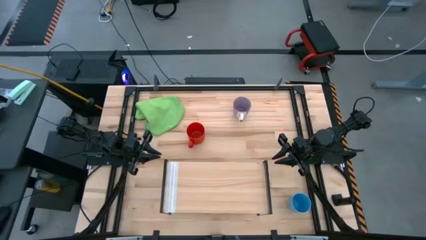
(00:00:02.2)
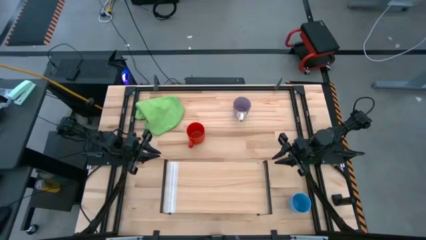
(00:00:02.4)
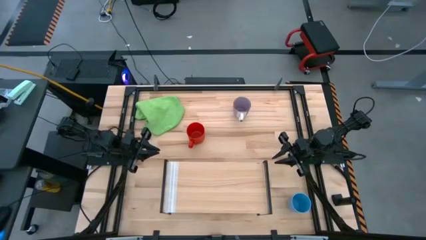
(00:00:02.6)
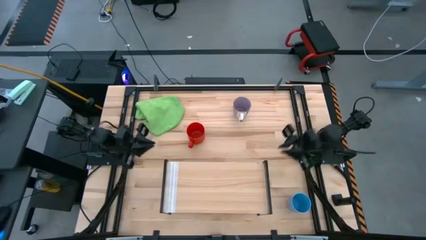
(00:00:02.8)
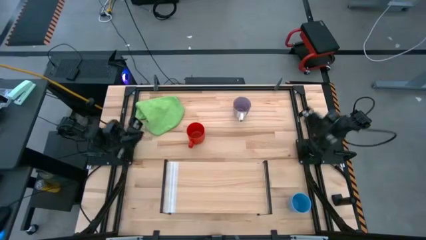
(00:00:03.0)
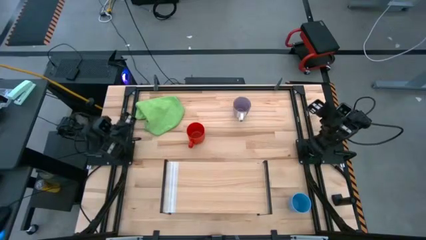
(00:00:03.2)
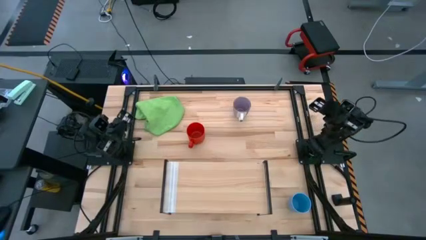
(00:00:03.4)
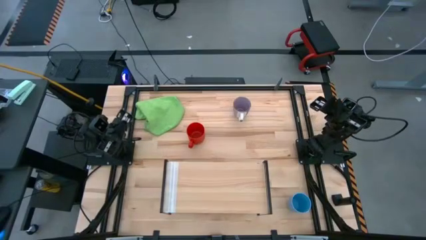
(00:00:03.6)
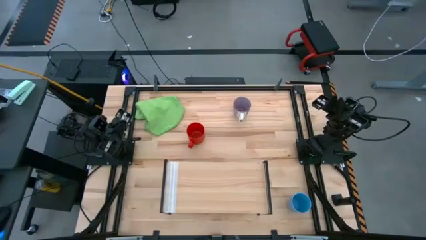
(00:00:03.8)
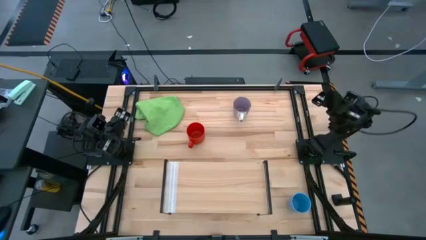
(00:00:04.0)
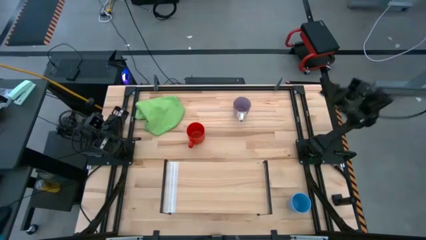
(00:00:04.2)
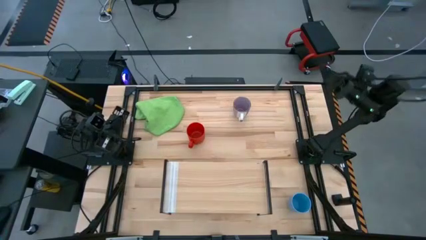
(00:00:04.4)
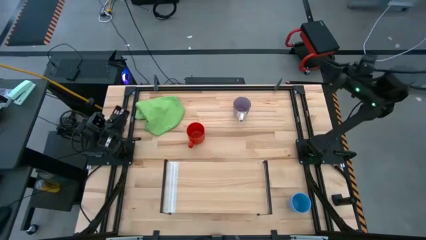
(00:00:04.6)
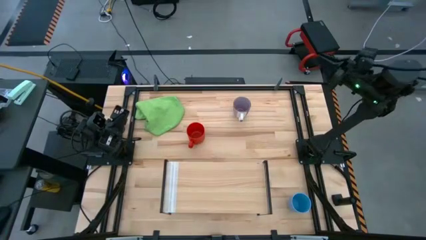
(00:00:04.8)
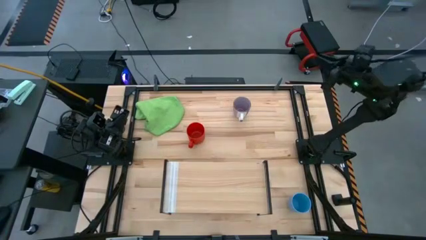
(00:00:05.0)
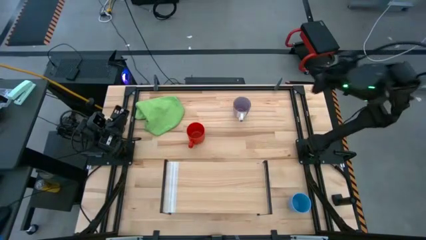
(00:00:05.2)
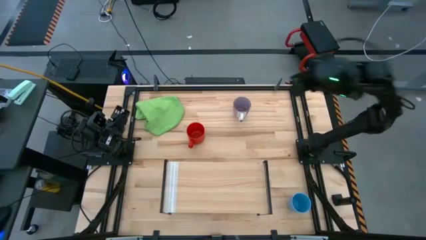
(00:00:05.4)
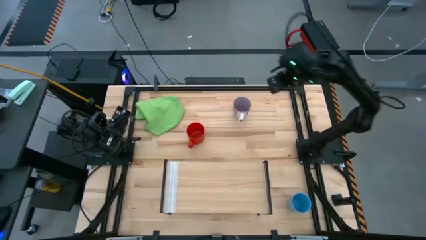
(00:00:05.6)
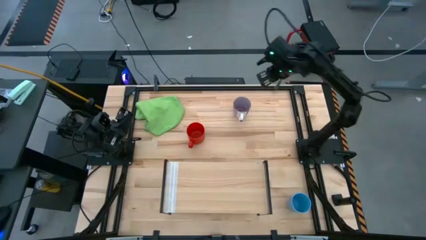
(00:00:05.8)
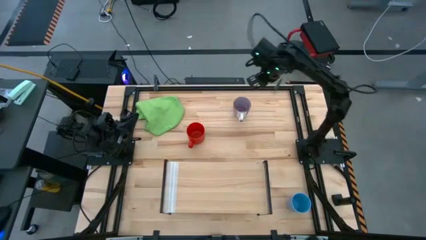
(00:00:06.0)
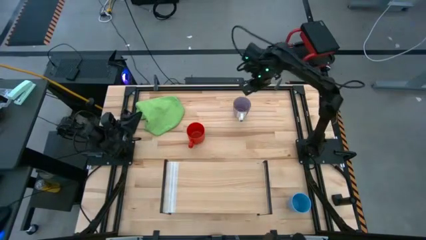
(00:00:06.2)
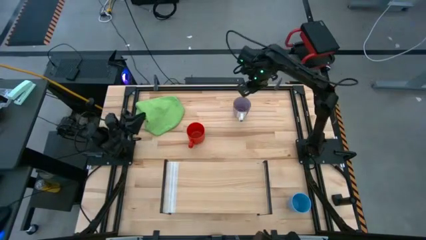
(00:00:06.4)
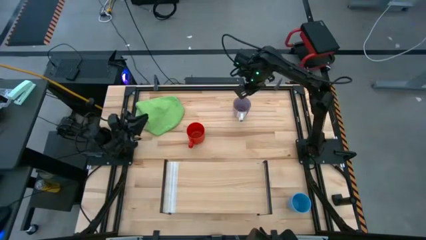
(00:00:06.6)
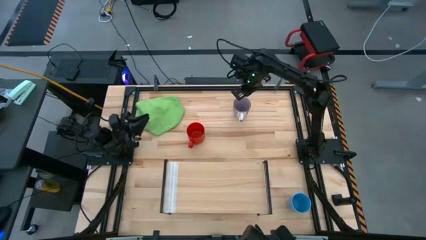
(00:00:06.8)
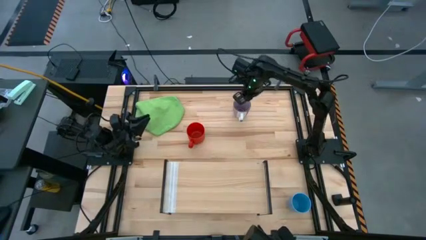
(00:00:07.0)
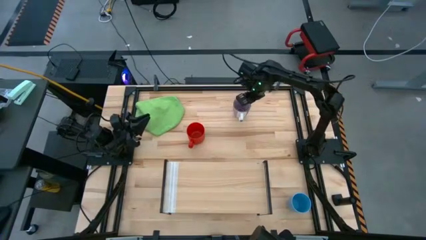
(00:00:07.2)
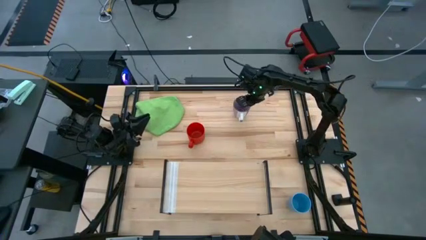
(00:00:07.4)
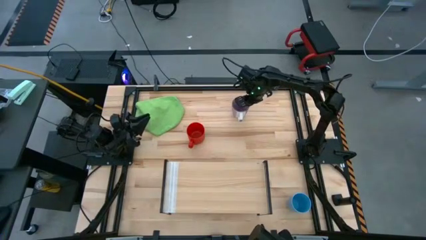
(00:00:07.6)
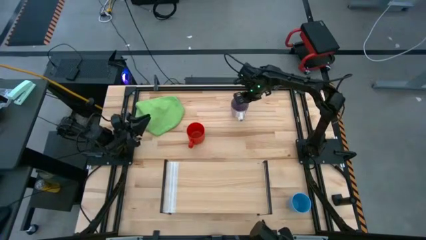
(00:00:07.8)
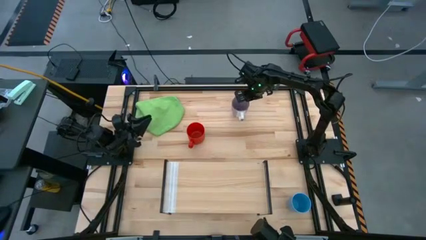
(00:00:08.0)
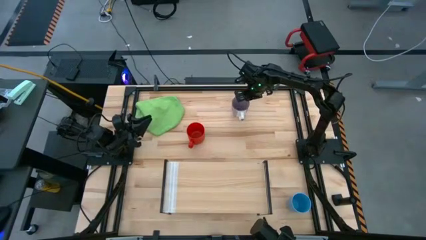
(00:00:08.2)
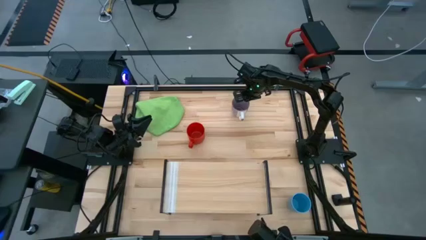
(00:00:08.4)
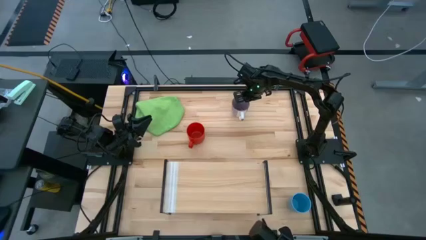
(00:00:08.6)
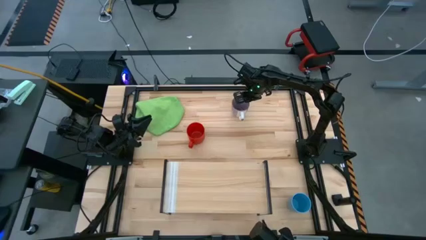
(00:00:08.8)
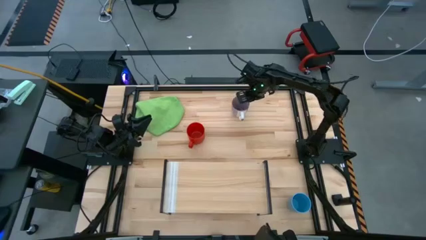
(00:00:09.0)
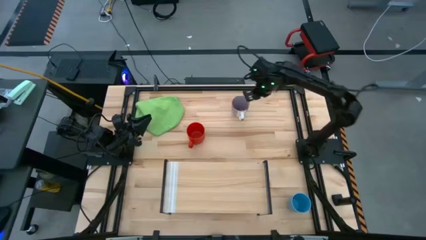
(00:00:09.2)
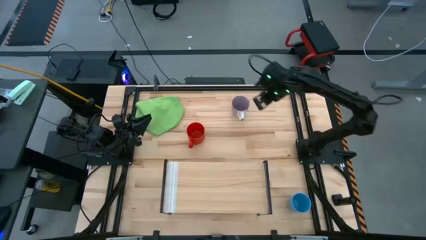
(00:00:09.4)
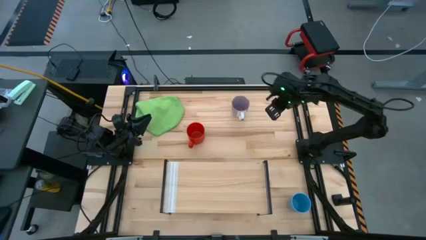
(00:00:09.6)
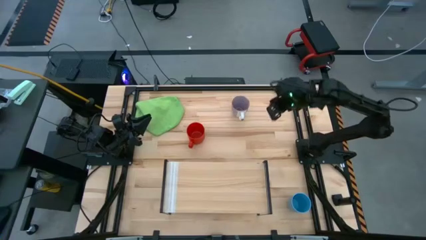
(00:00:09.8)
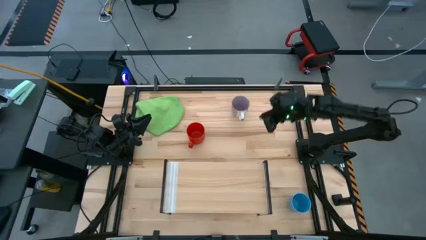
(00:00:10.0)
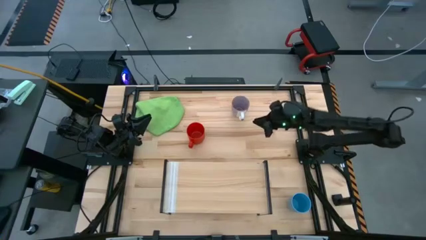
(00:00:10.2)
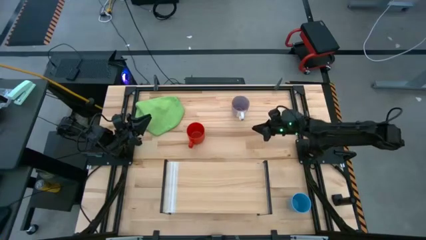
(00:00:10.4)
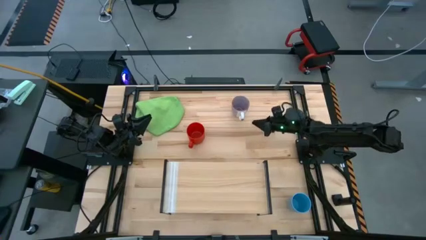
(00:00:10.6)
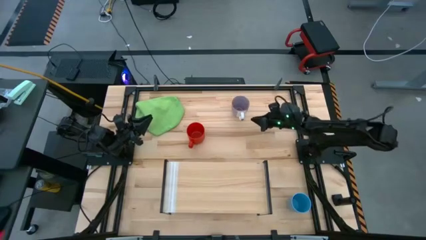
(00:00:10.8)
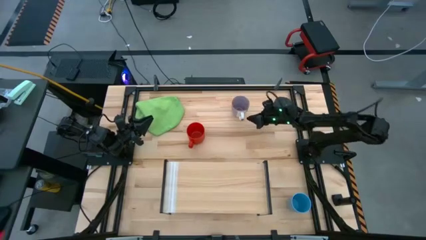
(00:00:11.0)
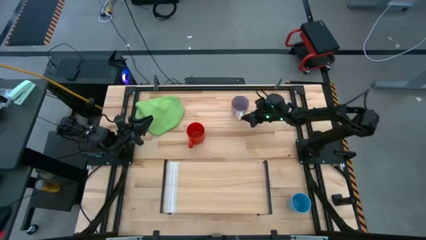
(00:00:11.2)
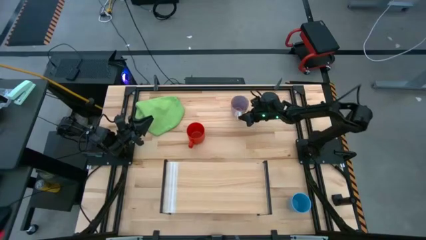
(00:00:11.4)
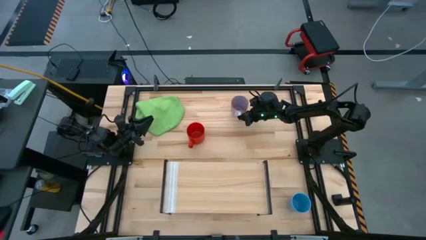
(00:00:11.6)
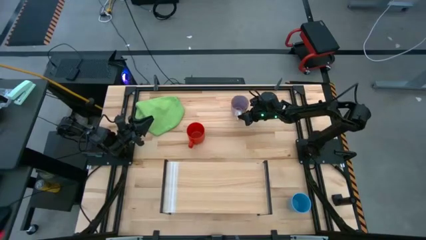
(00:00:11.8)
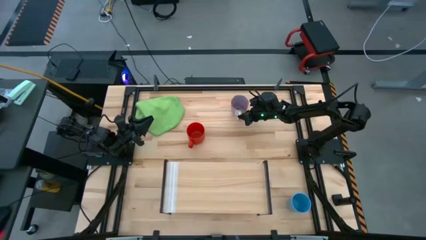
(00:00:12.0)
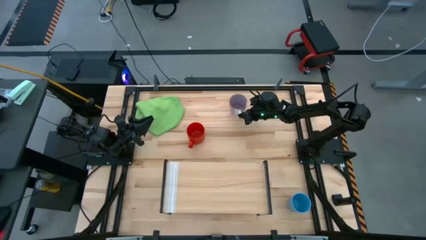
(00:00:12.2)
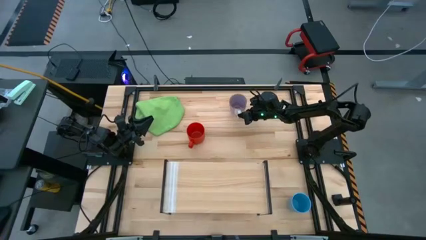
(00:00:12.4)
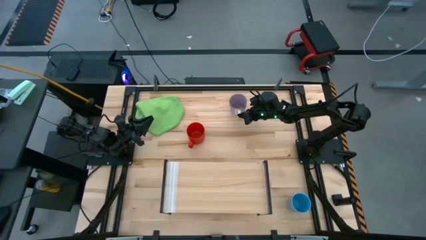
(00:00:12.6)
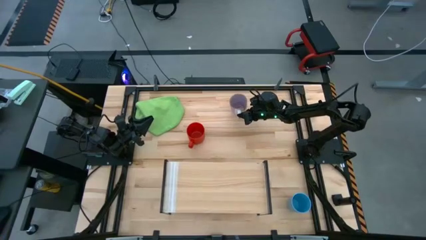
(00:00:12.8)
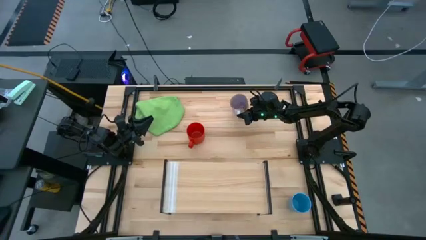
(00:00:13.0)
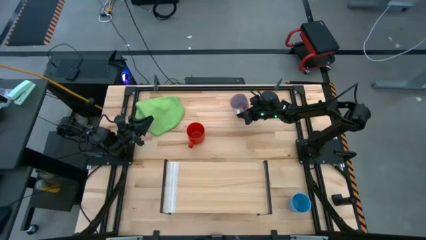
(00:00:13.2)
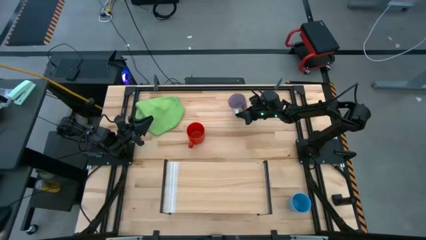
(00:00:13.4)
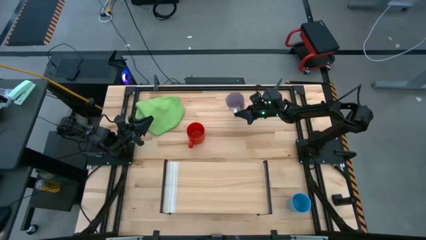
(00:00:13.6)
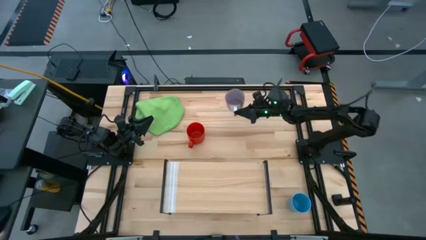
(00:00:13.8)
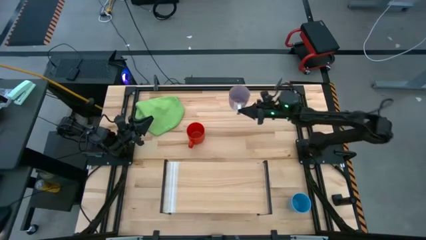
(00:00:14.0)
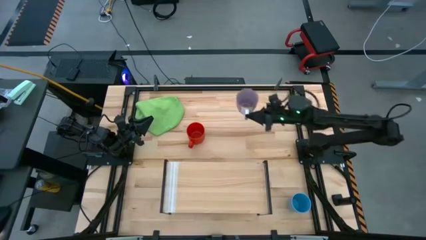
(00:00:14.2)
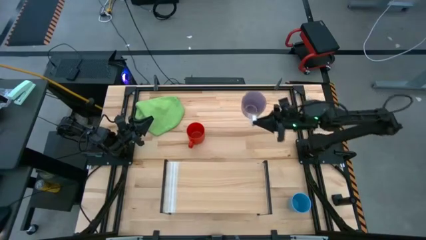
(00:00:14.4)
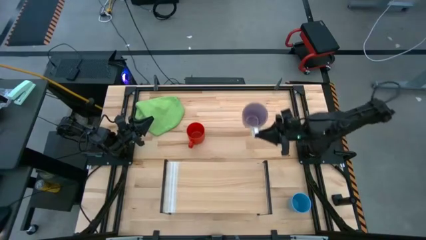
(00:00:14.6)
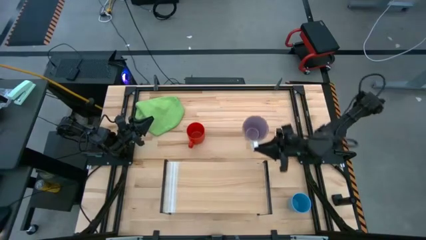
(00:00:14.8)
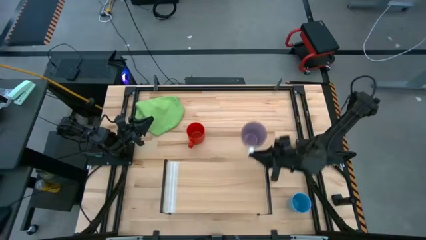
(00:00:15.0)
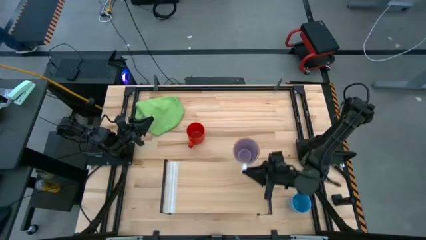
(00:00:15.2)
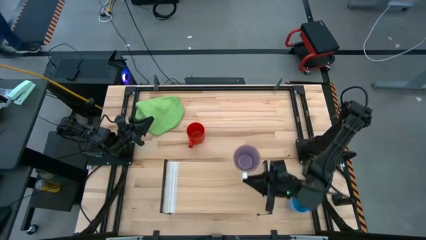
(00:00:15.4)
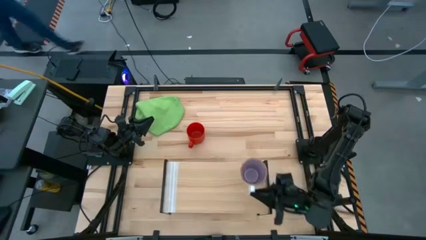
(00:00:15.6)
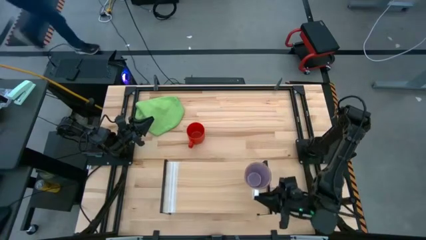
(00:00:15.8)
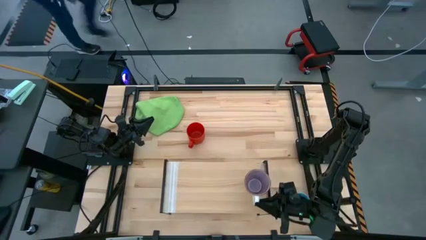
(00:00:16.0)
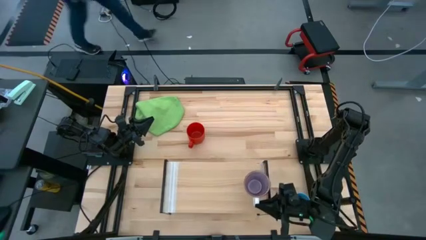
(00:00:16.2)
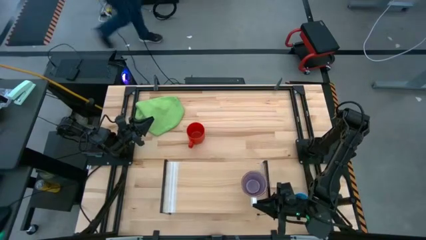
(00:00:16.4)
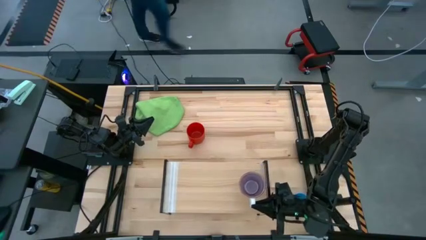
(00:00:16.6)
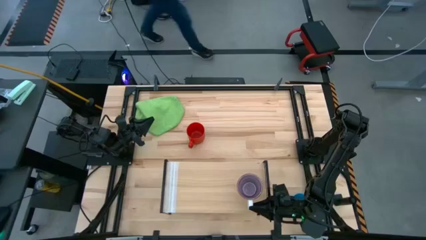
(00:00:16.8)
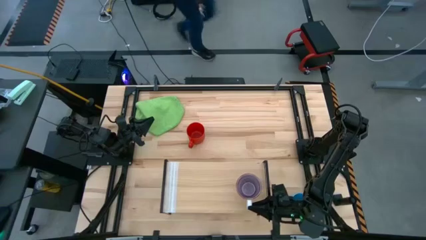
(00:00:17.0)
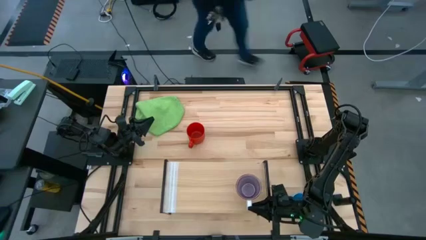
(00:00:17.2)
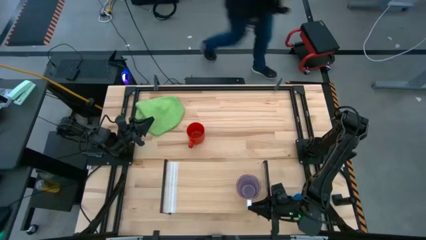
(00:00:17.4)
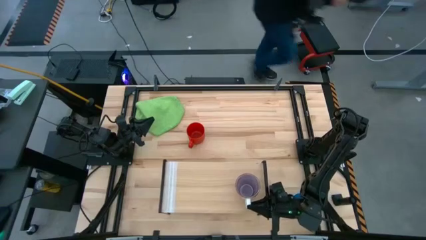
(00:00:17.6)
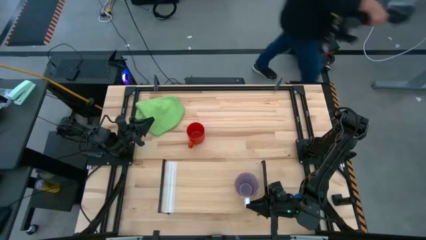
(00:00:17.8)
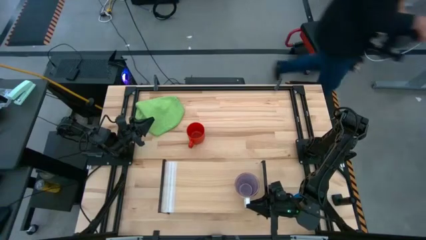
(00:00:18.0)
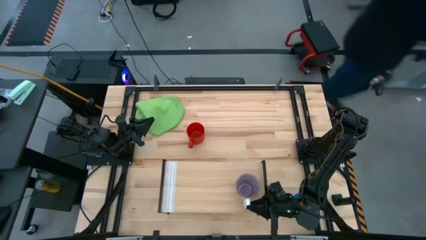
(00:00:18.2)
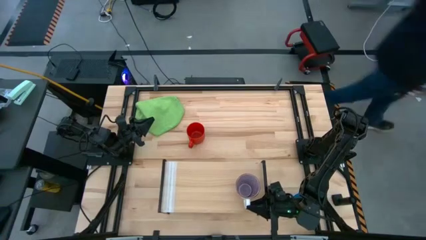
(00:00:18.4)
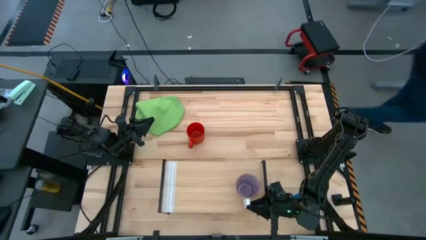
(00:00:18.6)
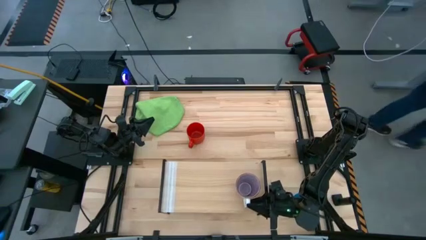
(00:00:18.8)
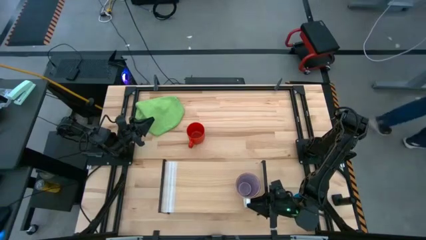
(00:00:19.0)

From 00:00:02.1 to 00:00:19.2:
Task: Stack small to large cups/mugs on shelf
Put the purple mug on the shelf
